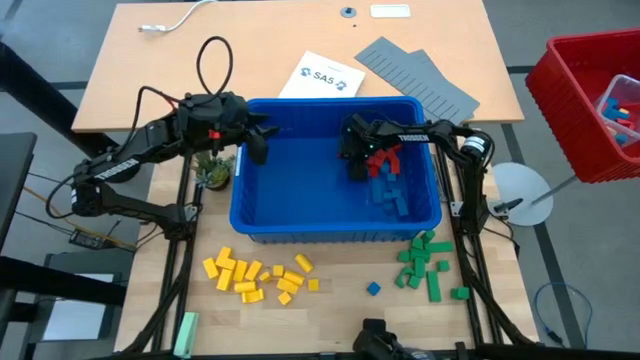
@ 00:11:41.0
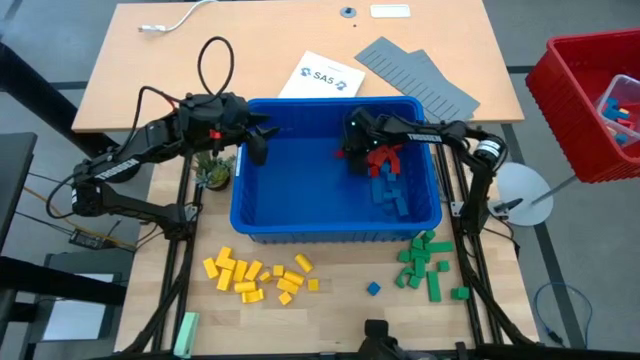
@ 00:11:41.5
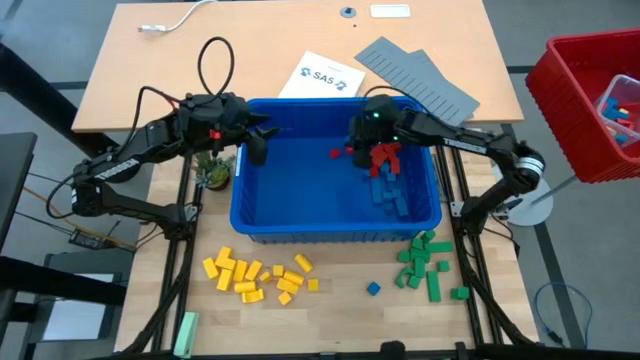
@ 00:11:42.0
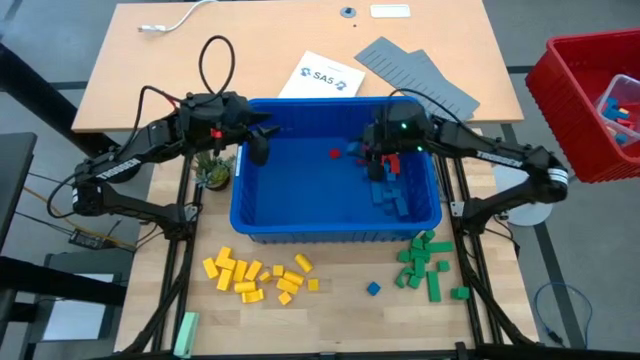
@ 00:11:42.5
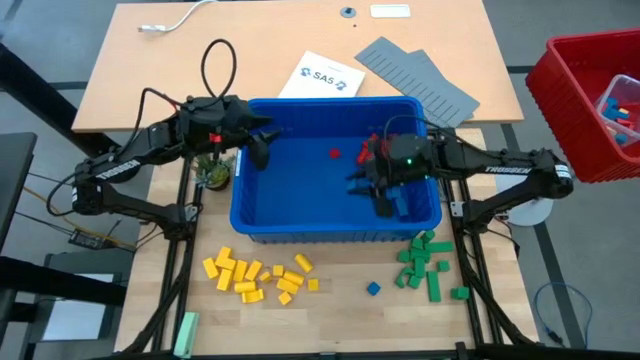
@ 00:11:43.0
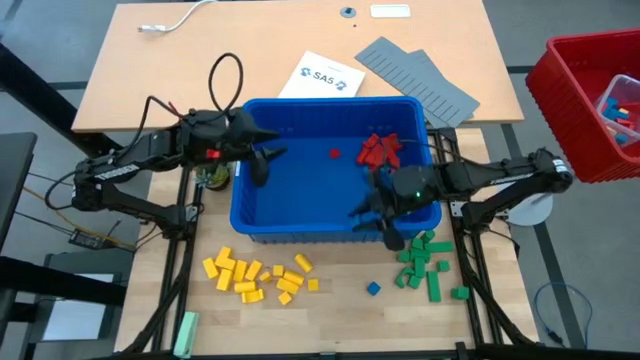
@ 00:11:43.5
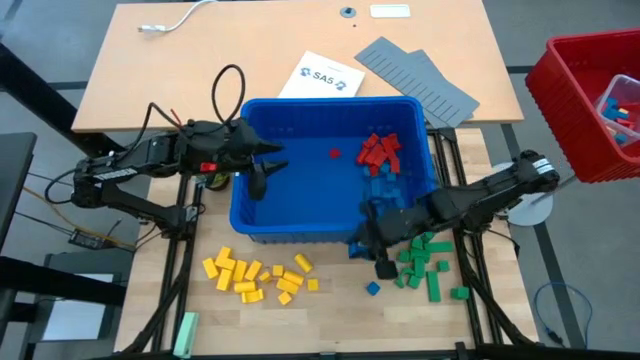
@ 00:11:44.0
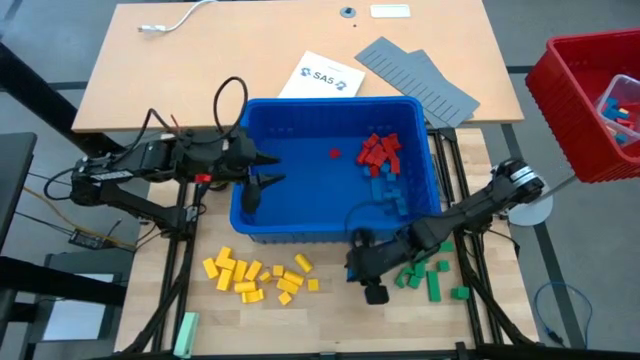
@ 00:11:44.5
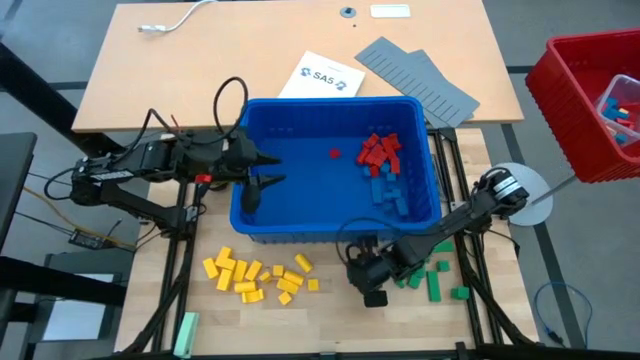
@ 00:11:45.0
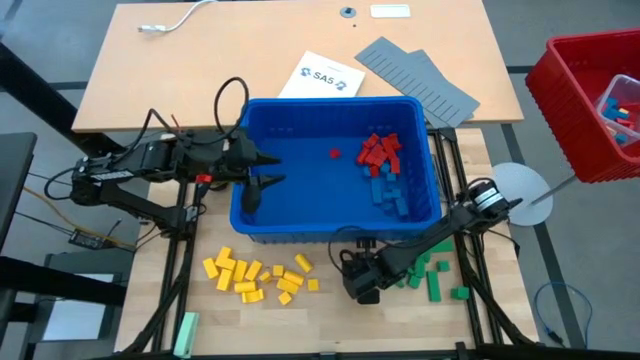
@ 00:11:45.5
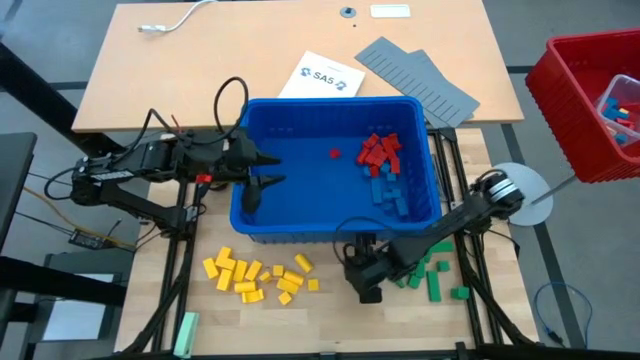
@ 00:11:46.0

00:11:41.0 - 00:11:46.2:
Task: Sort blocks
Remove the blue block from the blue bin

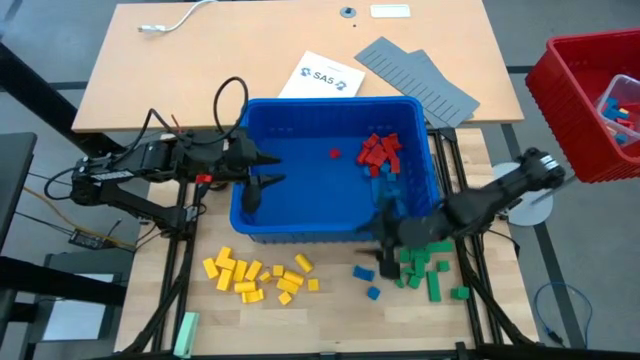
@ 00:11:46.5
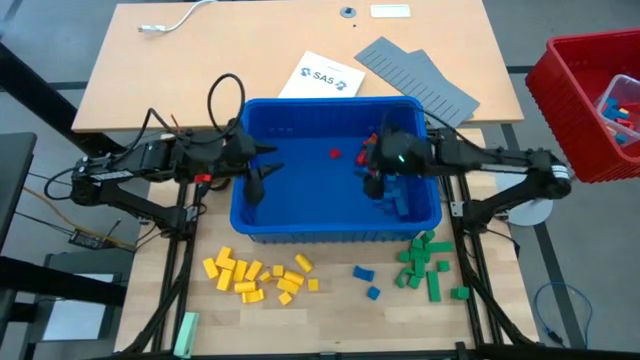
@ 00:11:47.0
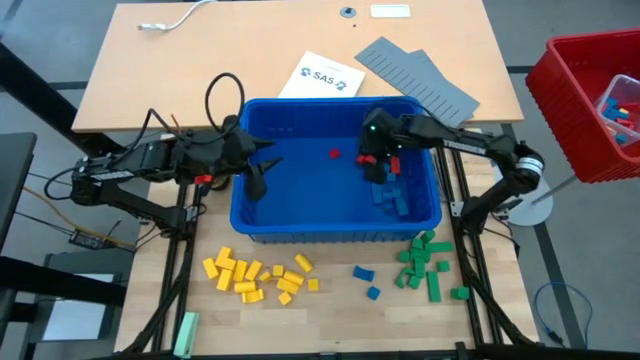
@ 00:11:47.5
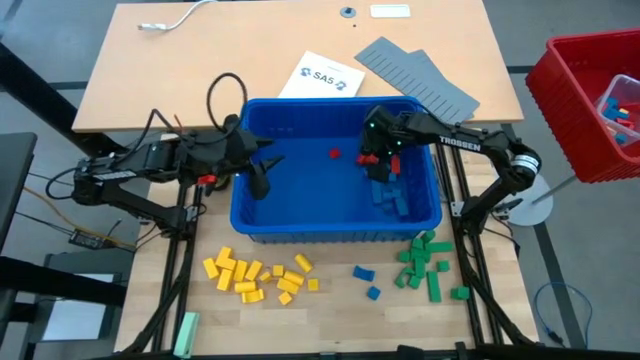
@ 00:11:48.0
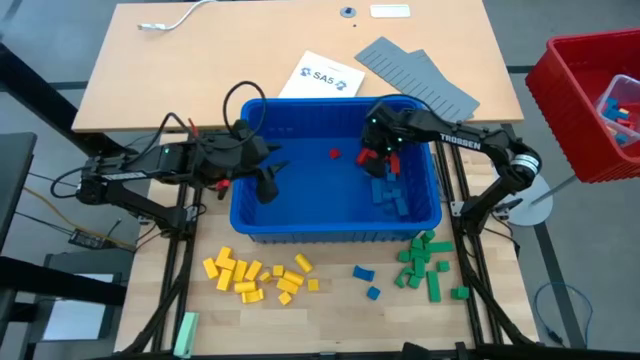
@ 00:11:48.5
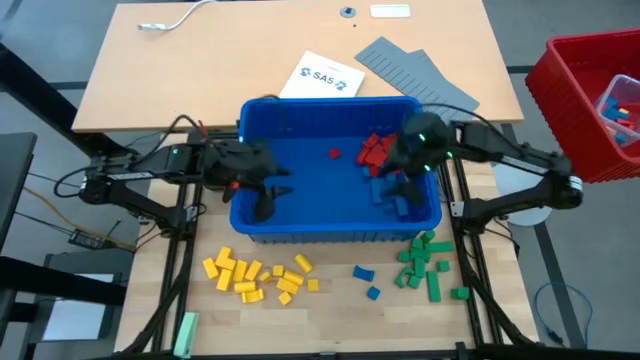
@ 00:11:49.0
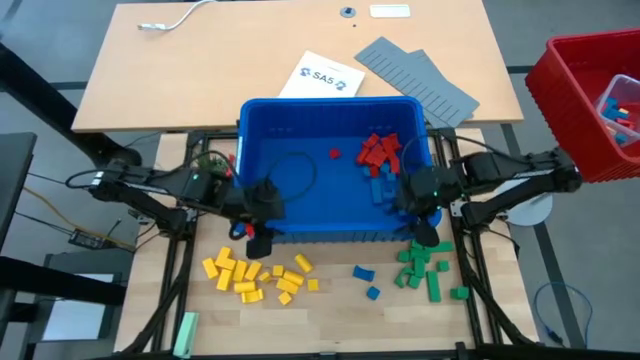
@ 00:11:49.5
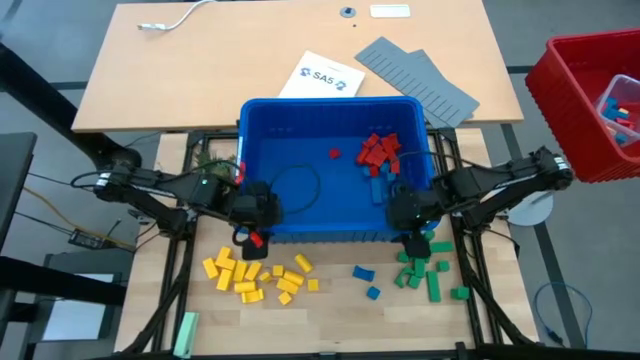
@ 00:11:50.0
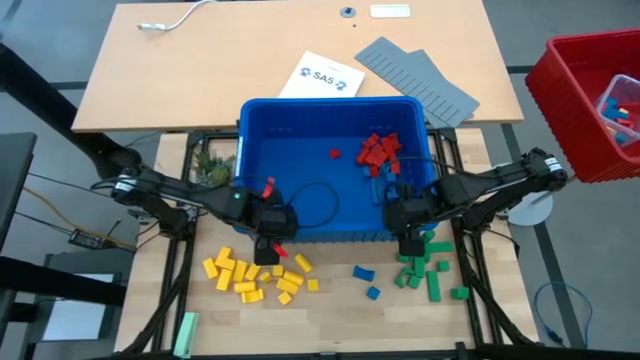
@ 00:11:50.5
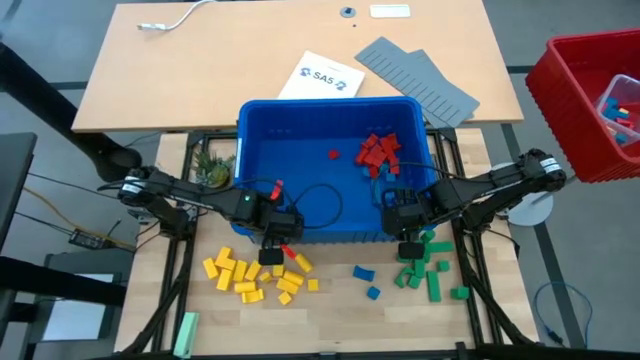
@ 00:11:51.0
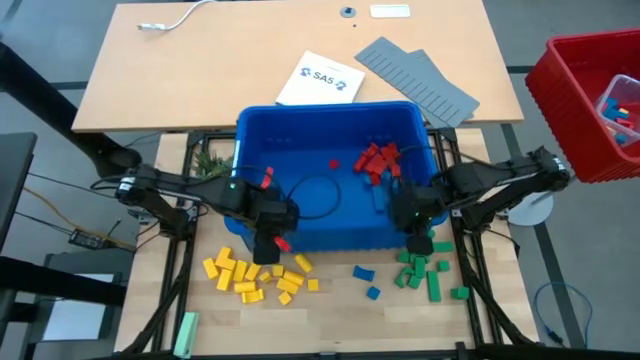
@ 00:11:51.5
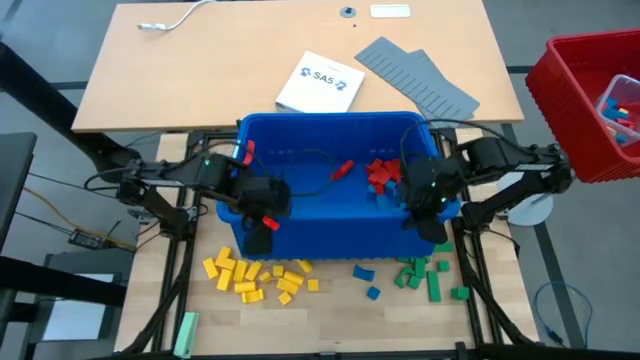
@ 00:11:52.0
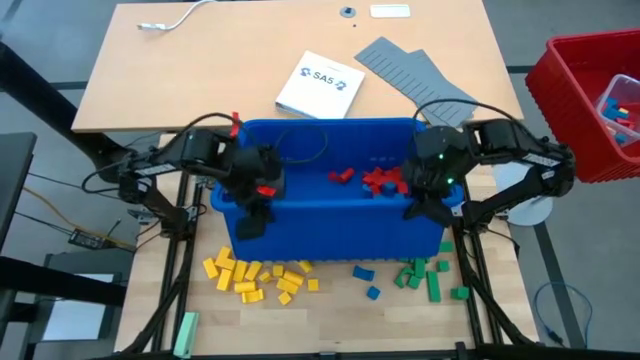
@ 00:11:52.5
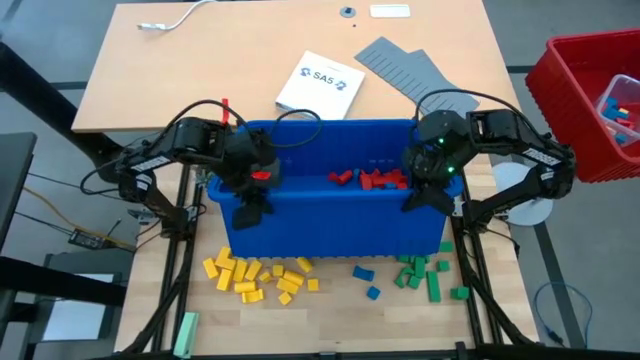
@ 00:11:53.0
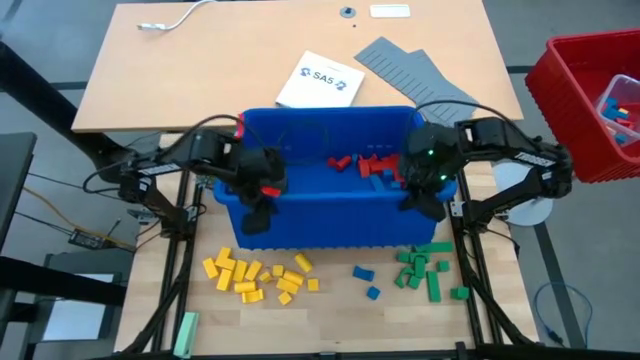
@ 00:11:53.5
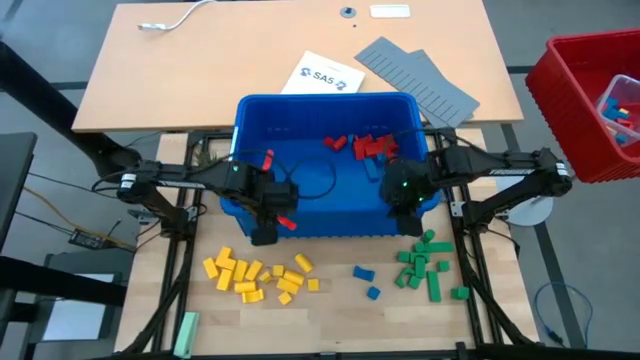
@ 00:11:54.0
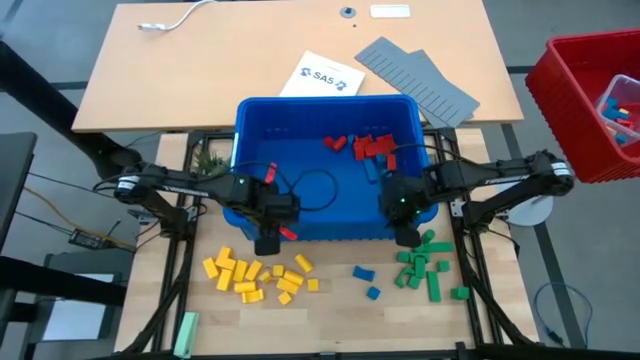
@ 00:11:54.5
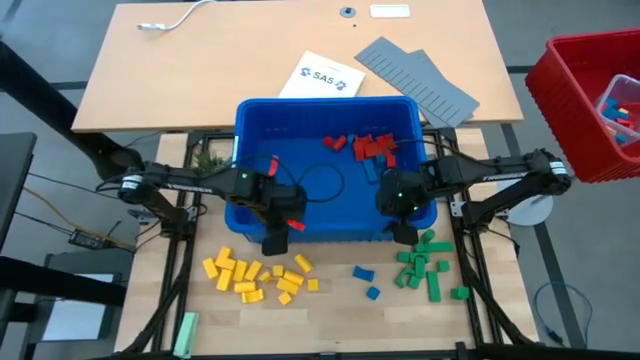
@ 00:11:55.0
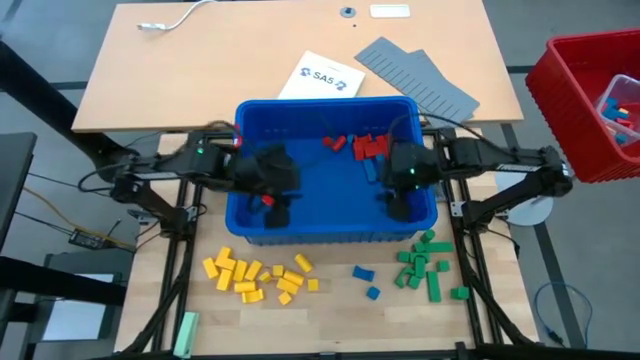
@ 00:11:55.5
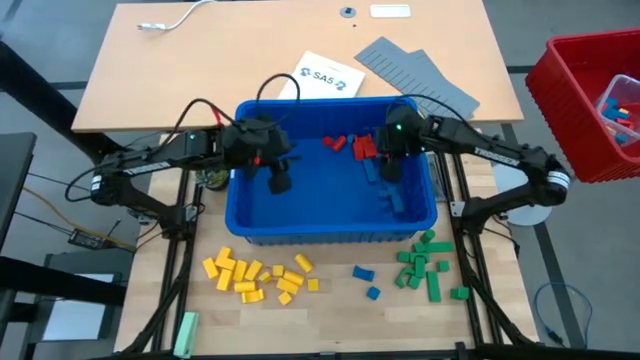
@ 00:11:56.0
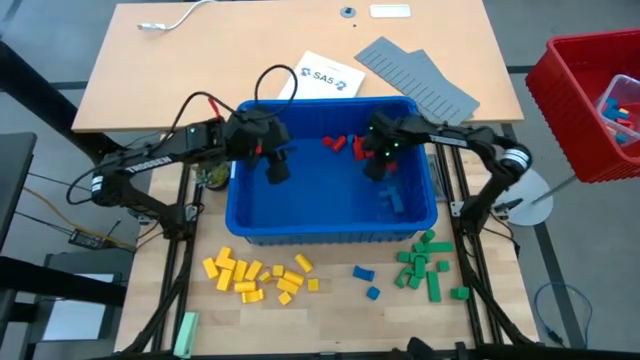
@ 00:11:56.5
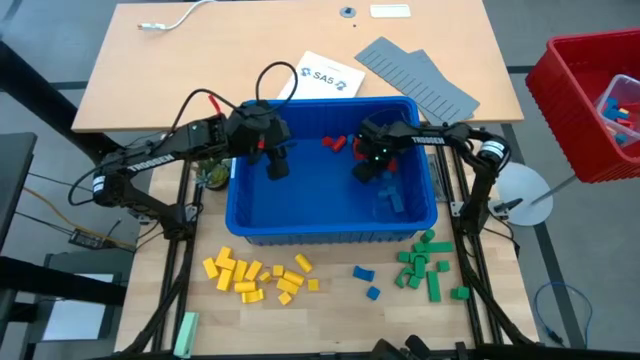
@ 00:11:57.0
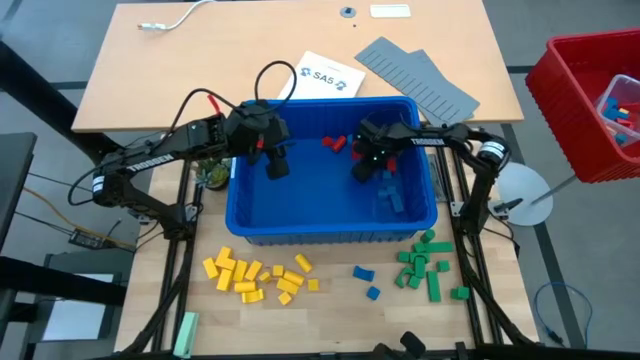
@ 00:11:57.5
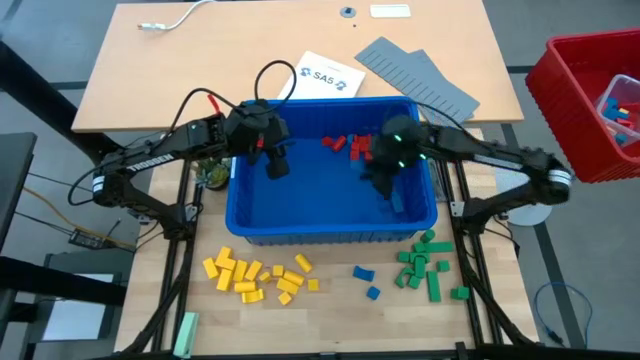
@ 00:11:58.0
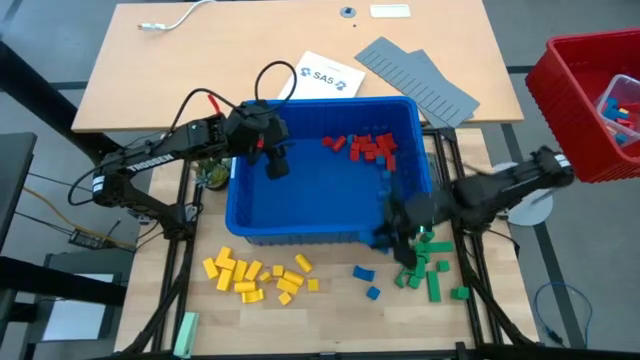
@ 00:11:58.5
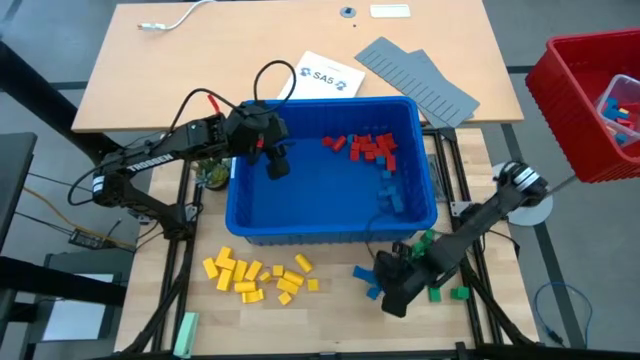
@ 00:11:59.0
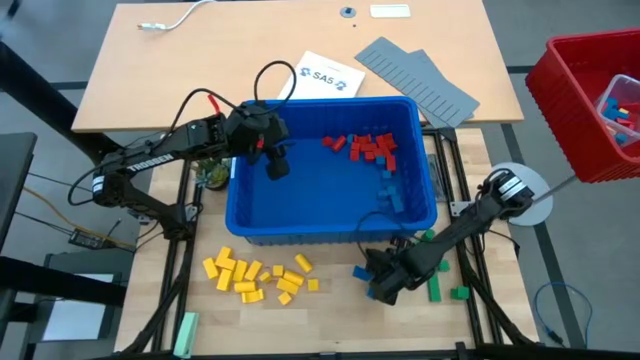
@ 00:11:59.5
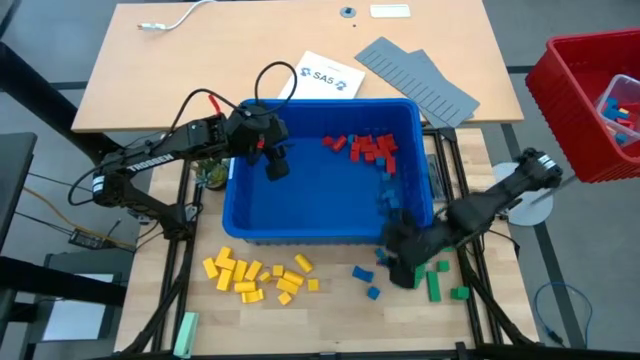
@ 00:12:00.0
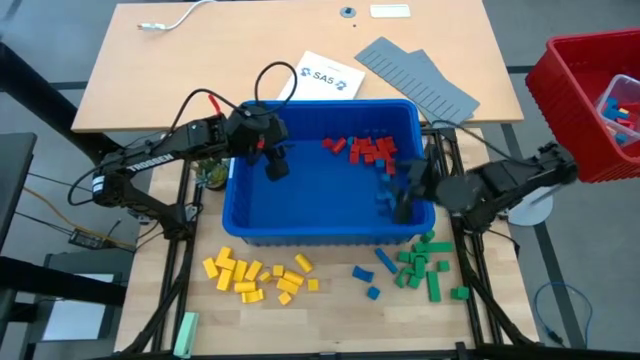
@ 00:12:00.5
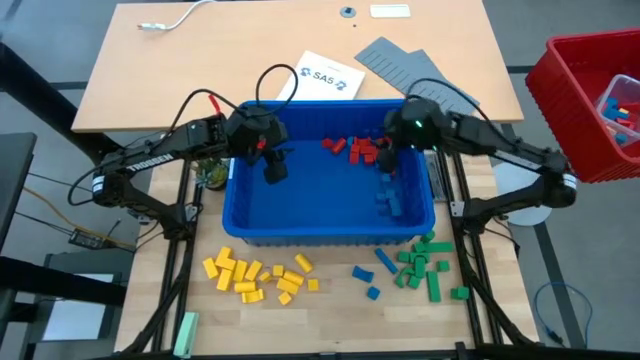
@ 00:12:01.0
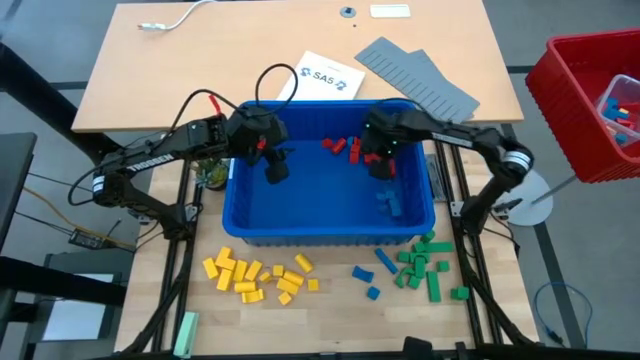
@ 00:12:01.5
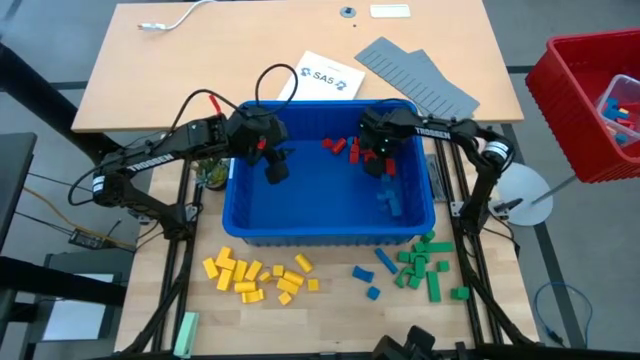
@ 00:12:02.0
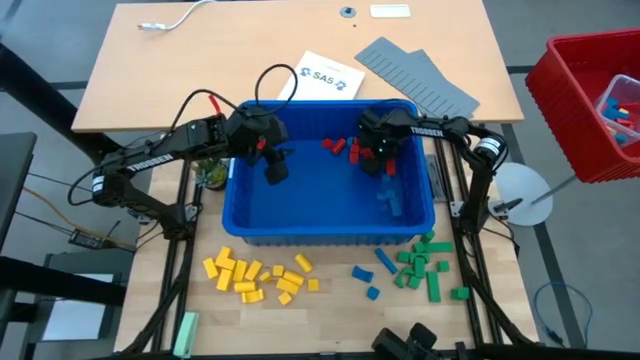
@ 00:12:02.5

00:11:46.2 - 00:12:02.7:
Remove the blue block from the blue bin
